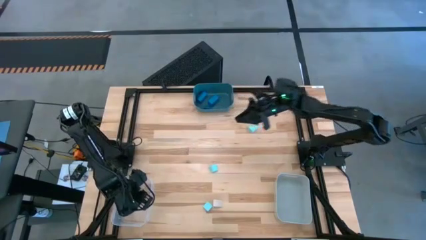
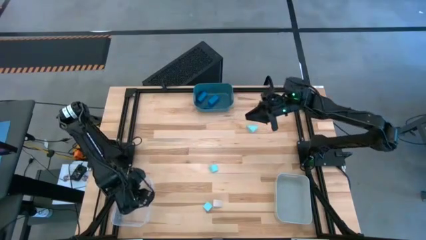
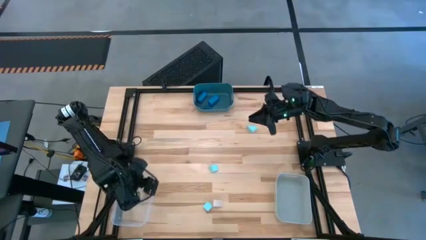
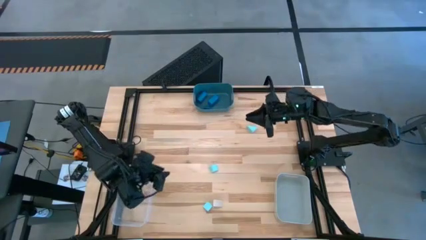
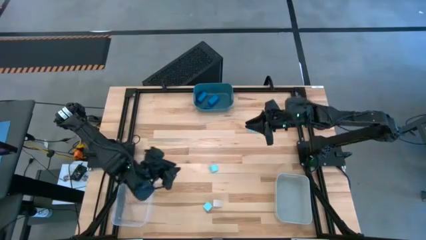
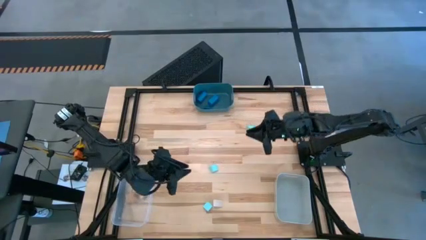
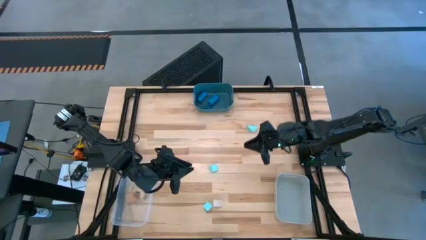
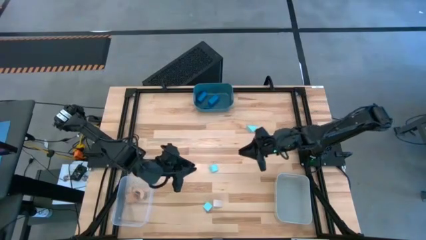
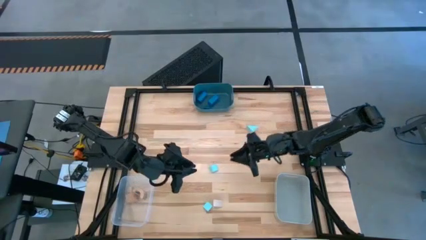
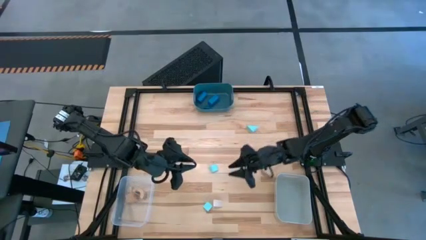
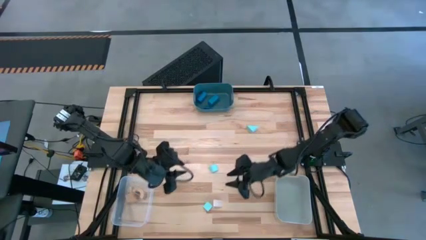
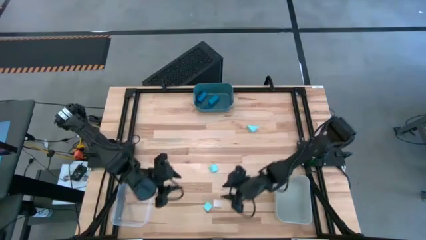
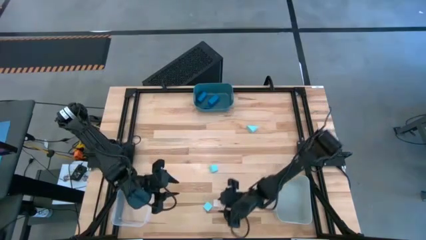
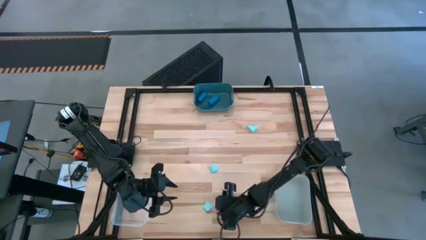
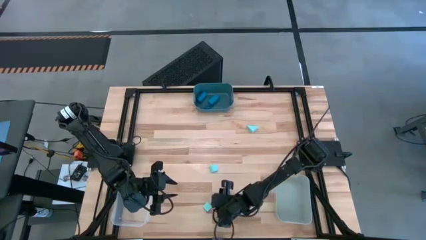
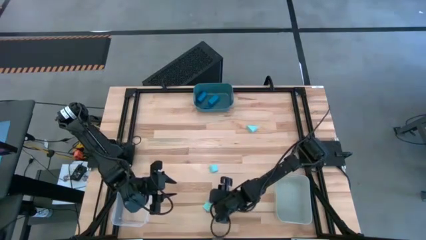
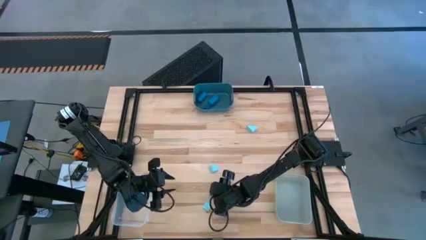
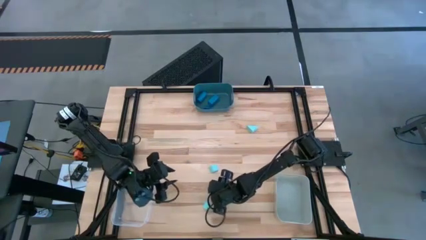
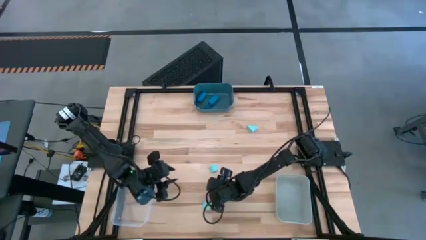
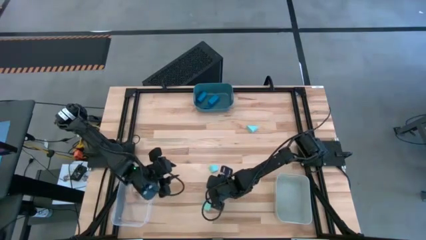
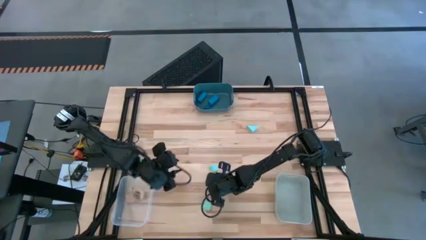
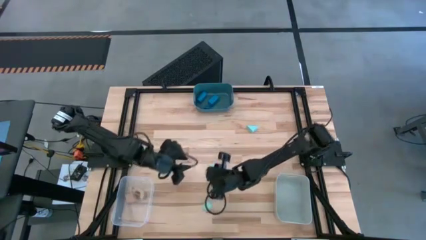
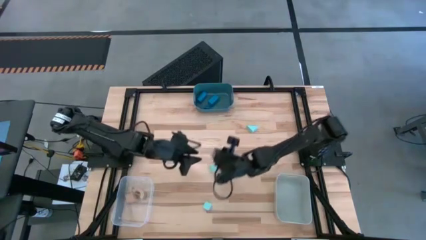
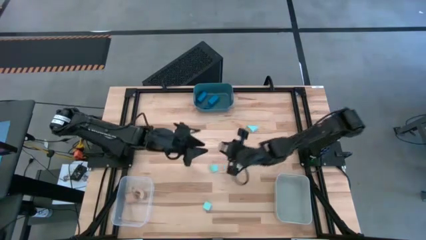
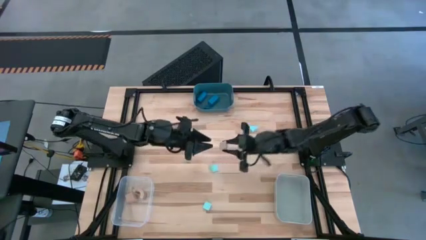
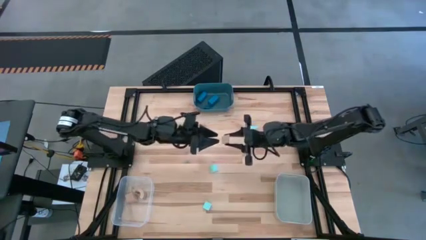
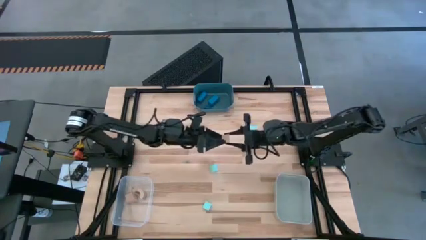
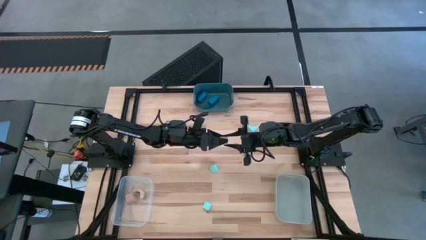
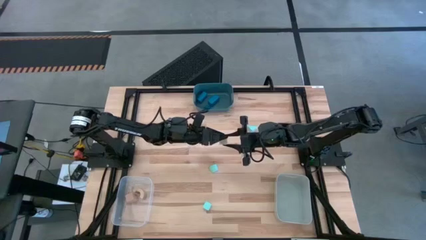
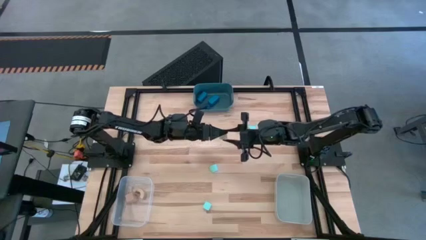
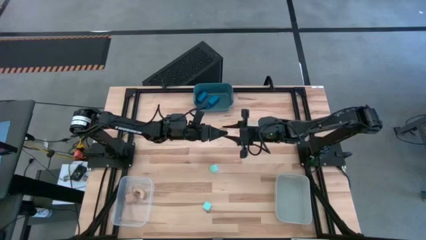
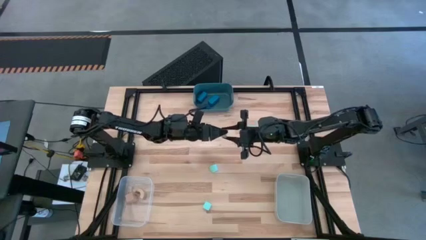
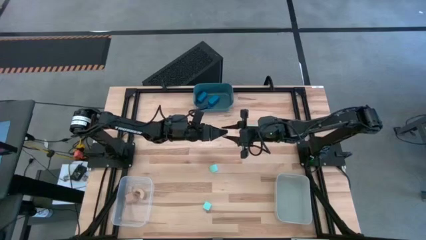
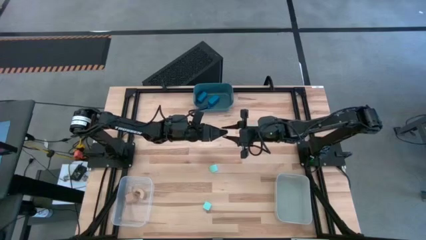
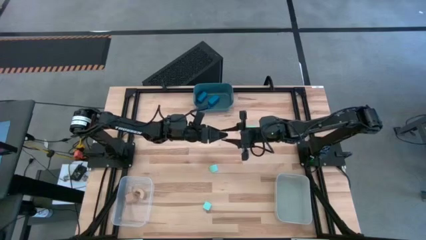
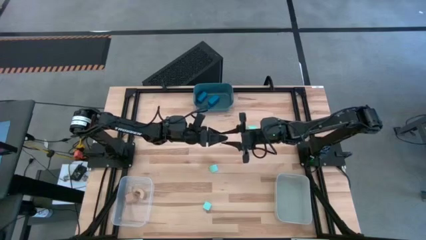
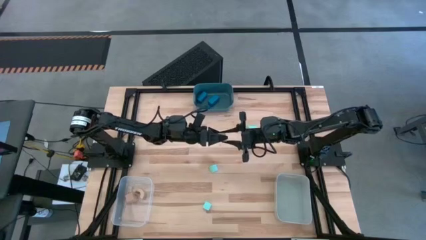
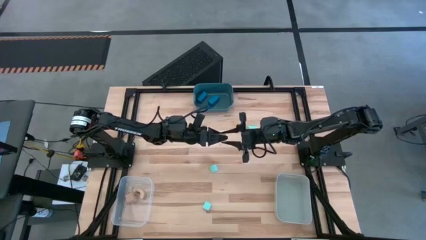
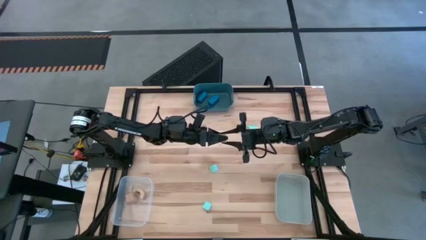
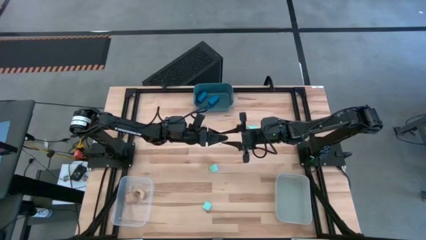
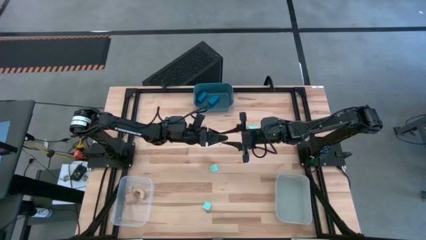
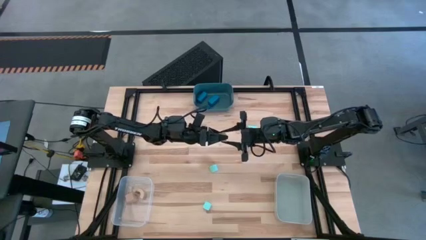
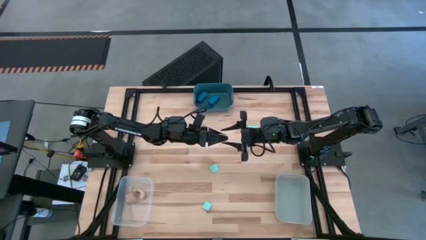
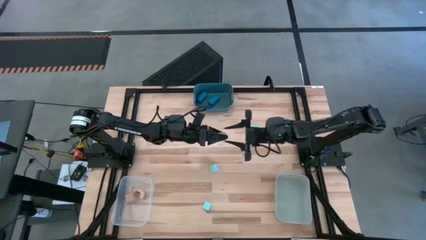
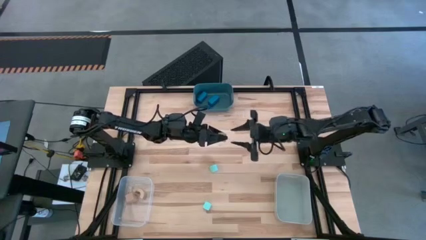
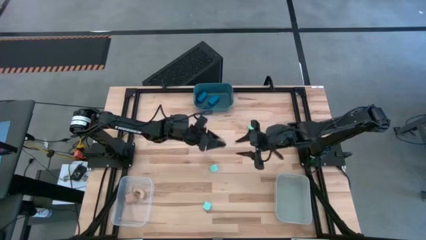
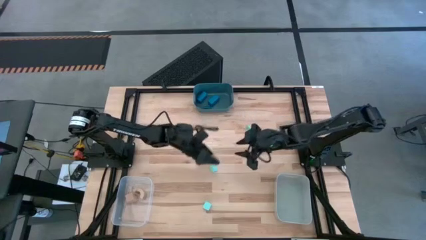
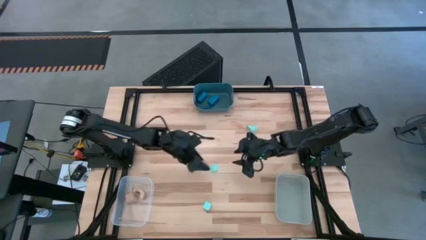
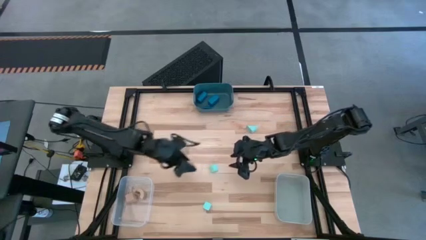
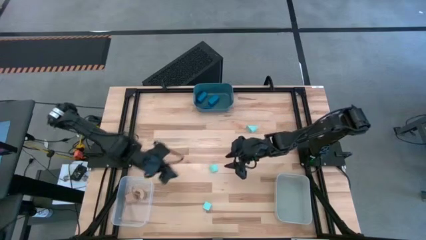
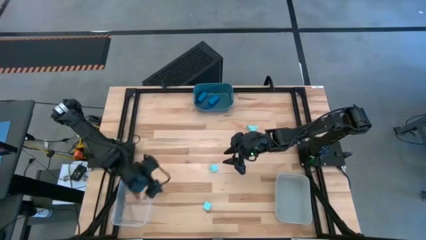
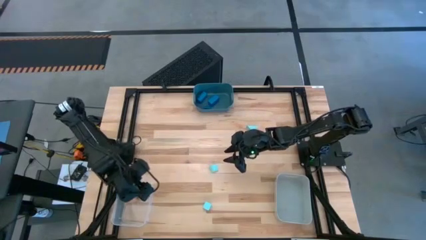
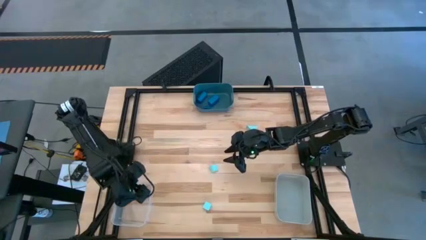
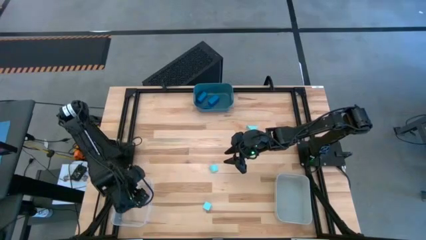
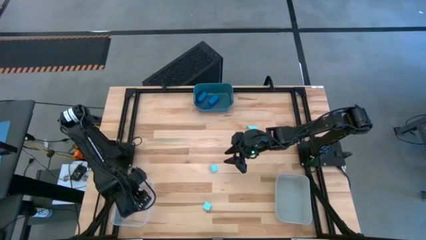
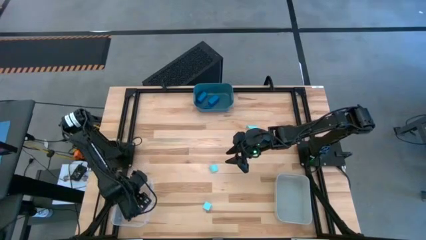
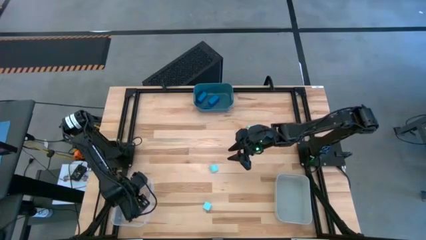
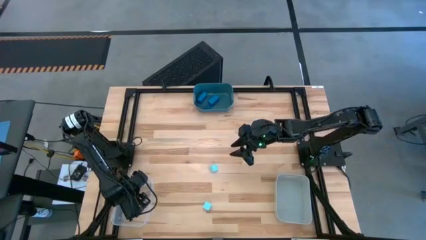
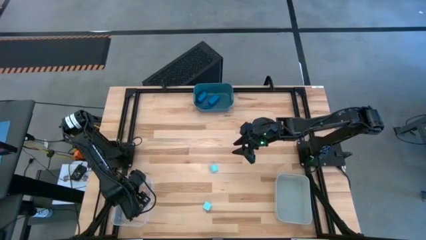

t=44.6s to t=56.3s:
Task: Sort & place blocks by color
Put the brown block into the transparent bin

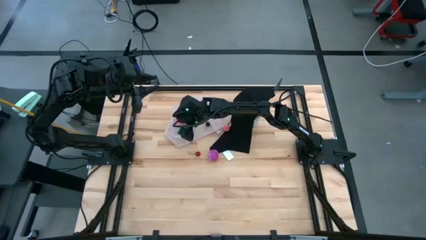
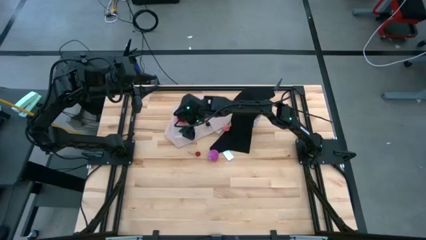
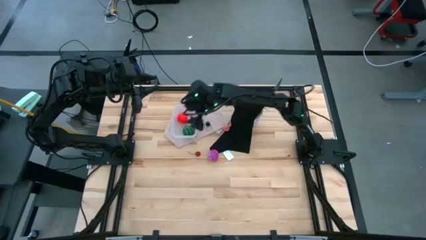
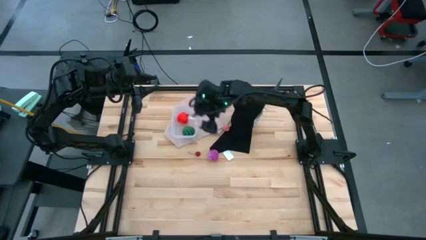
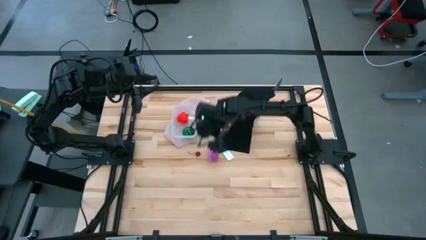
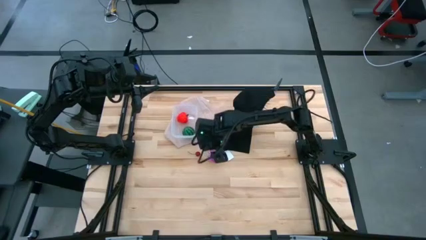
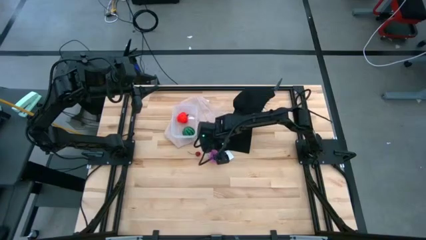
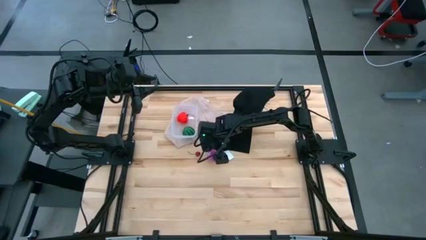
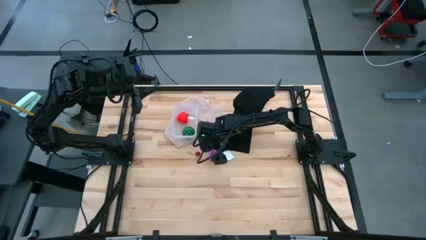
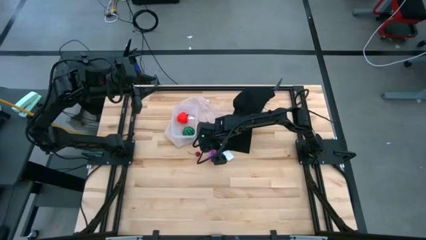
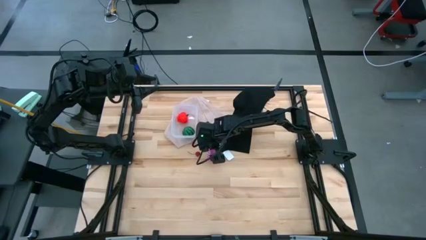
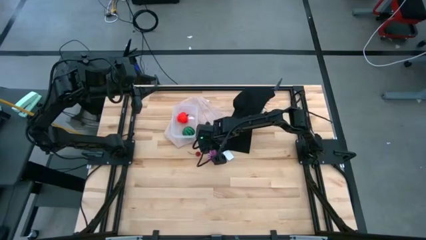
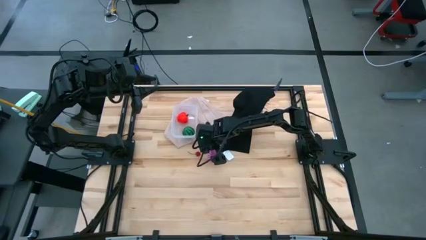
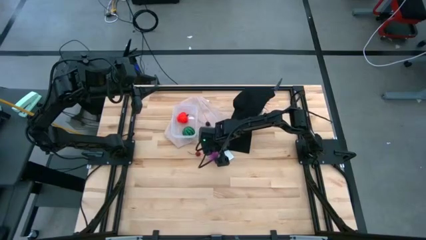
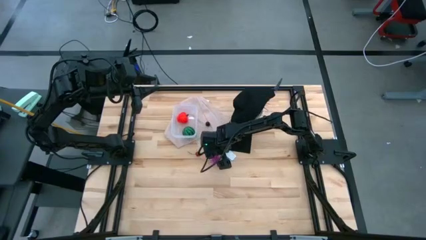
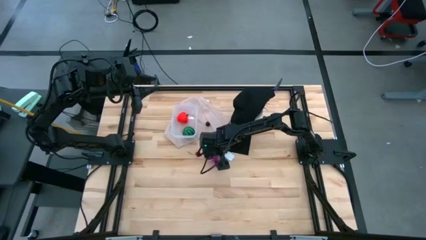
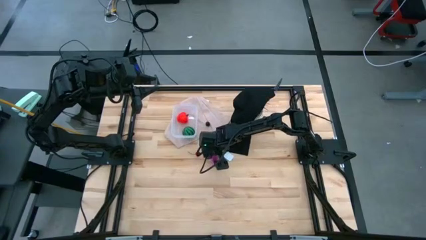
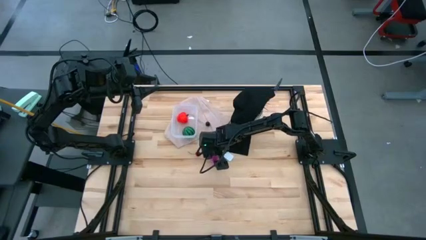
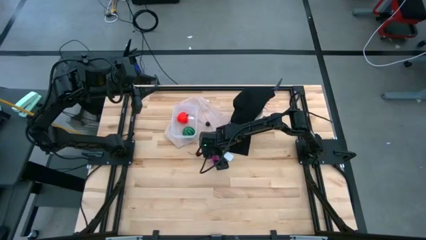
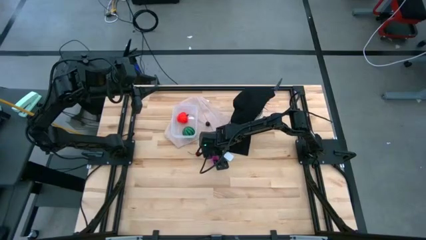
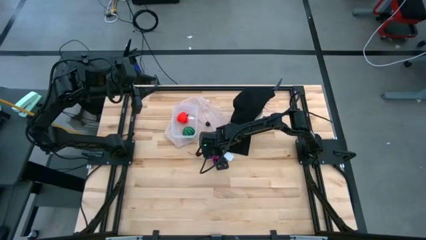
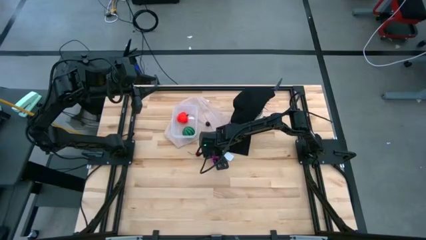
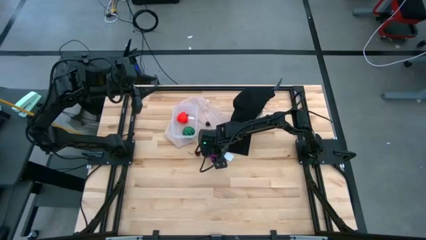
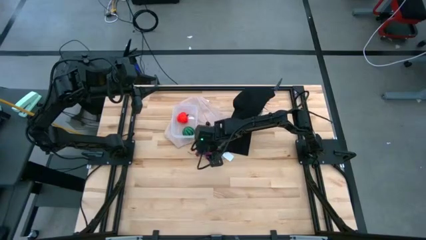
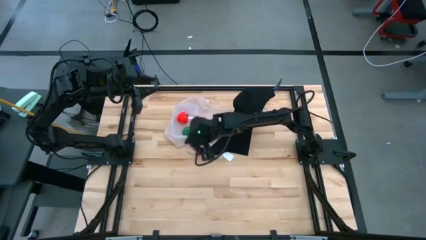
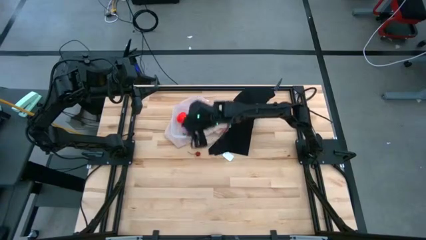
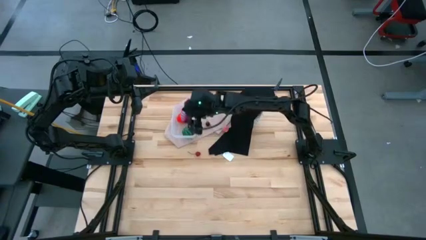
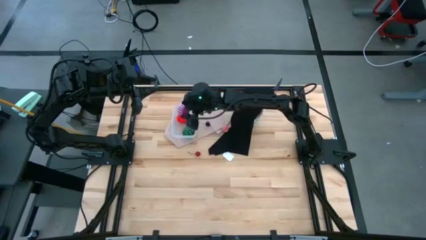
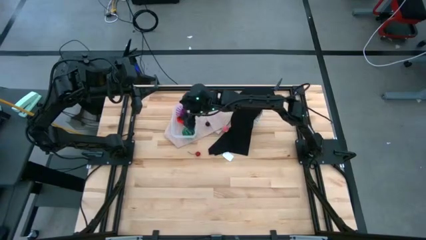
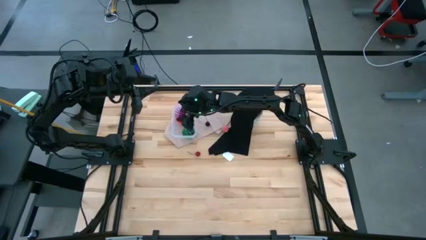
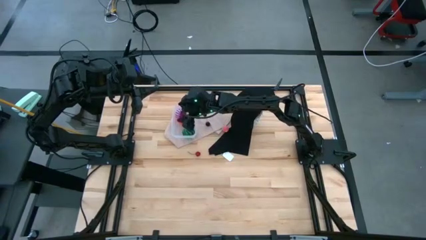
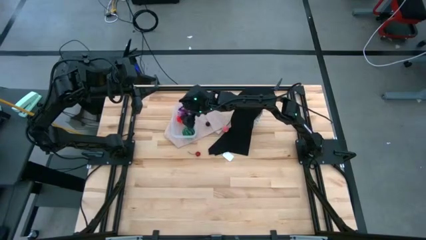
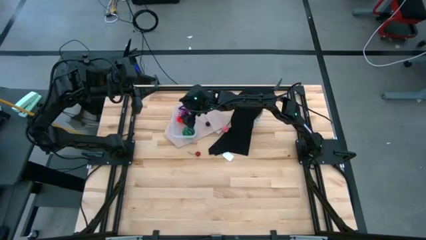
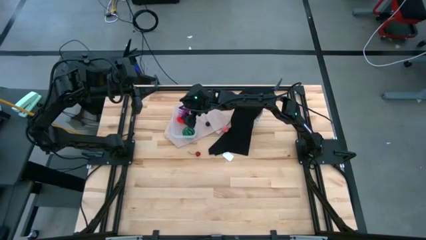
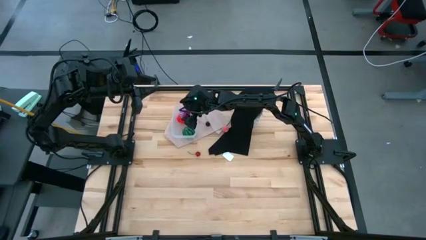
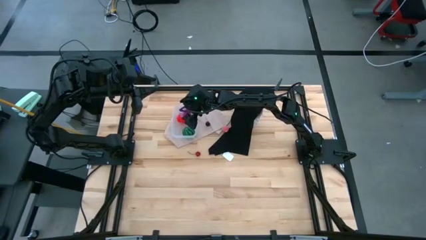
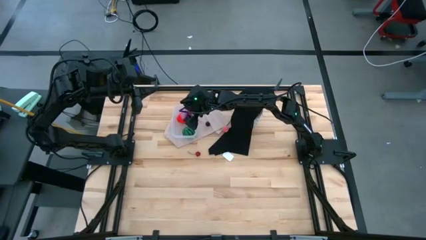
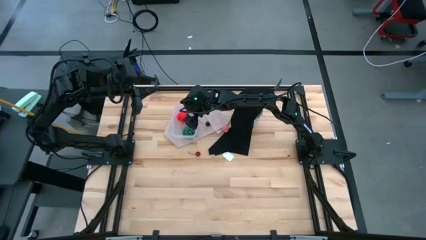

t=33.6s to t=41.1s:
Task: Pick and placing Produce into tupperware
Put the purple onion into the transparent bin
